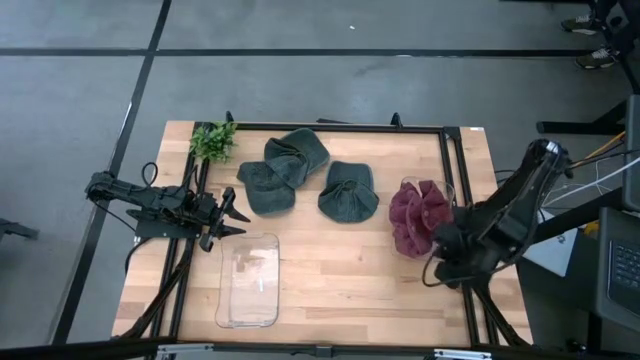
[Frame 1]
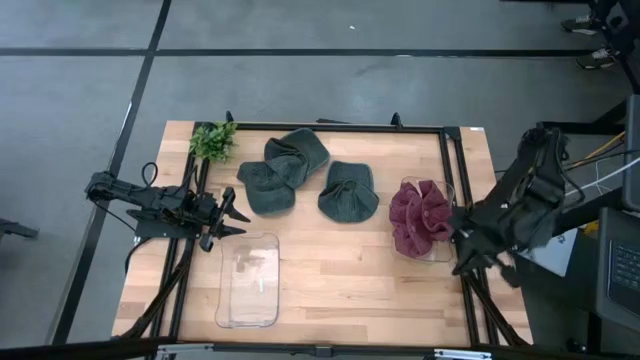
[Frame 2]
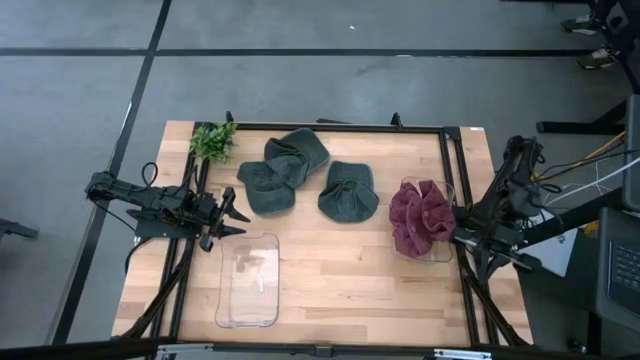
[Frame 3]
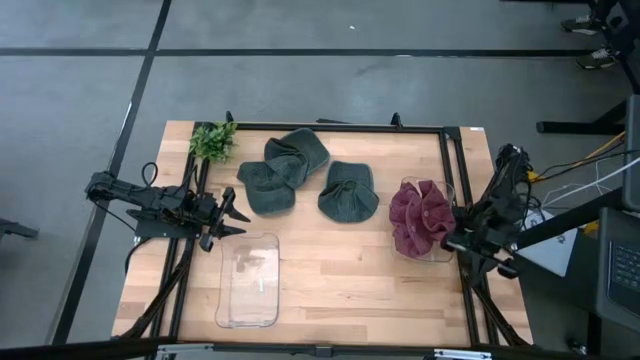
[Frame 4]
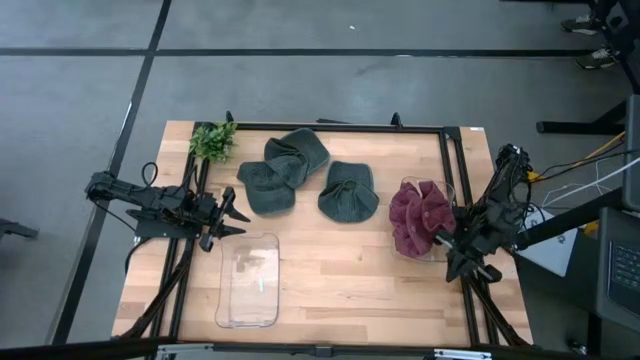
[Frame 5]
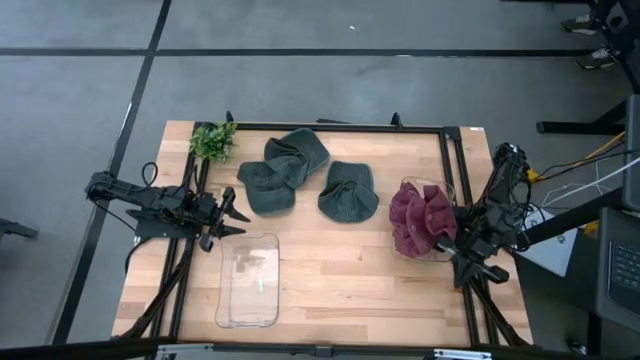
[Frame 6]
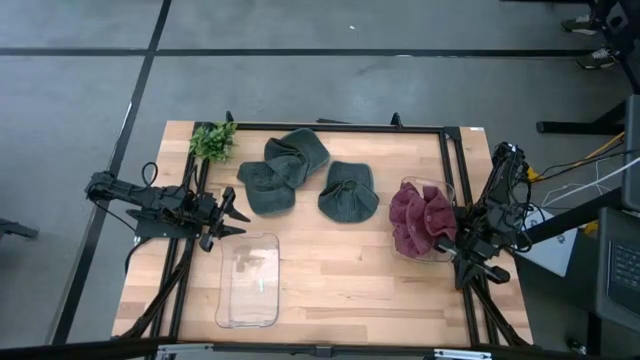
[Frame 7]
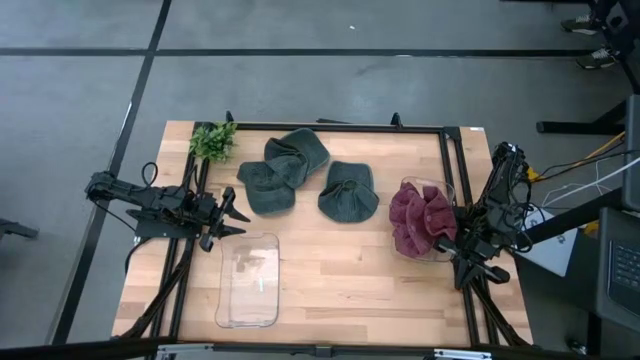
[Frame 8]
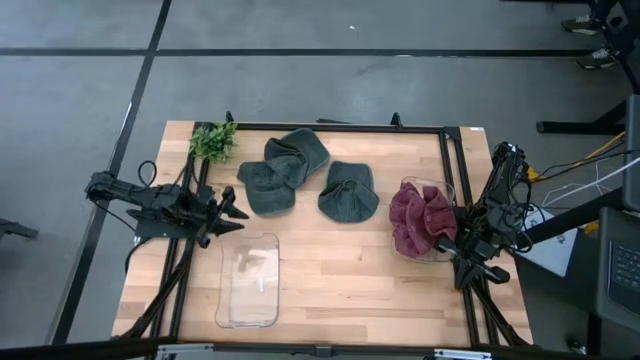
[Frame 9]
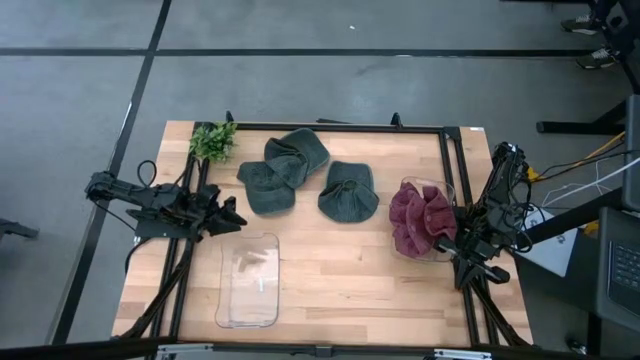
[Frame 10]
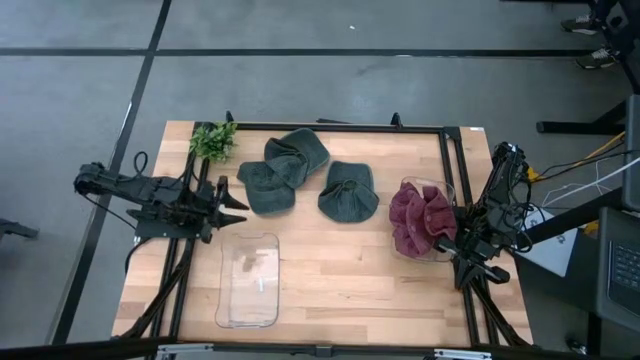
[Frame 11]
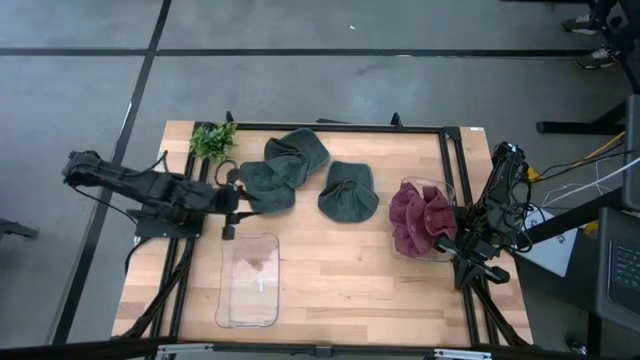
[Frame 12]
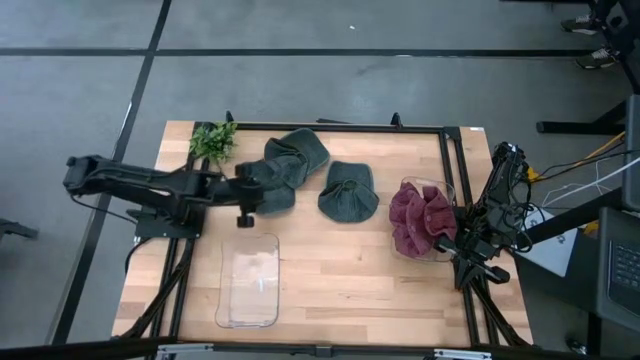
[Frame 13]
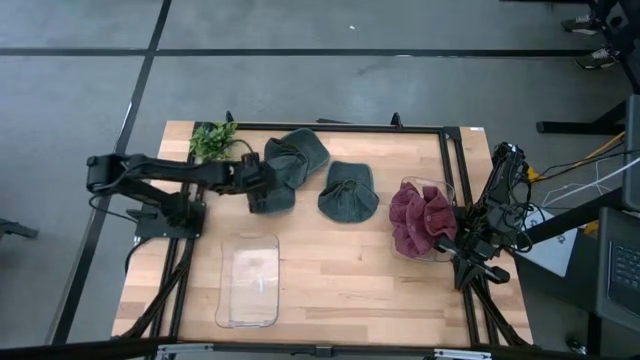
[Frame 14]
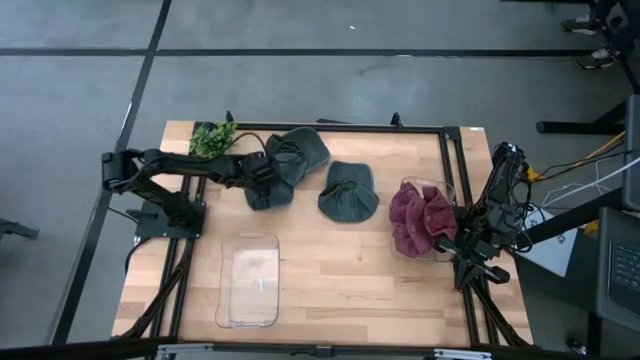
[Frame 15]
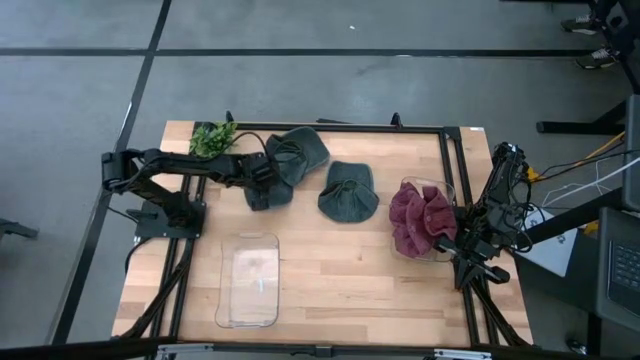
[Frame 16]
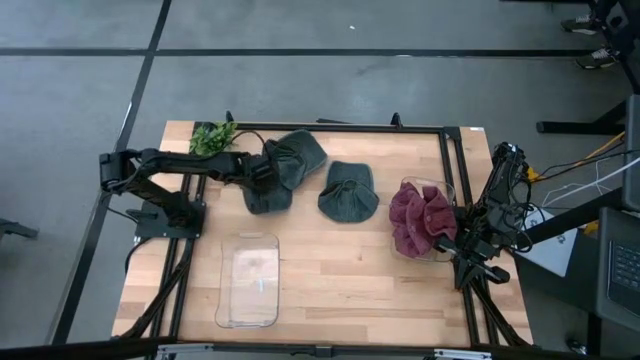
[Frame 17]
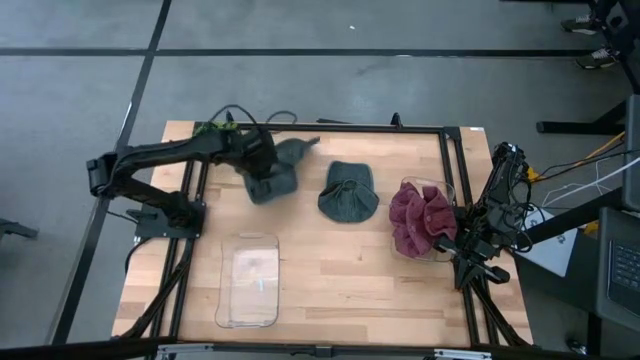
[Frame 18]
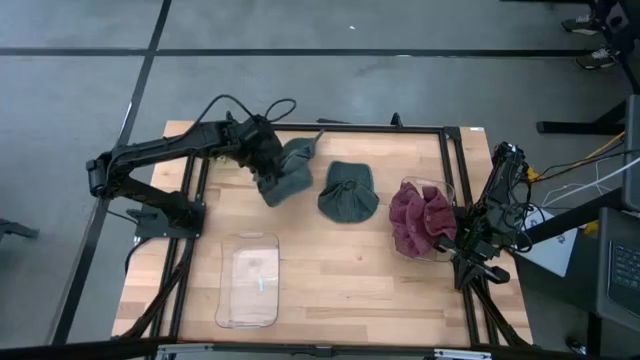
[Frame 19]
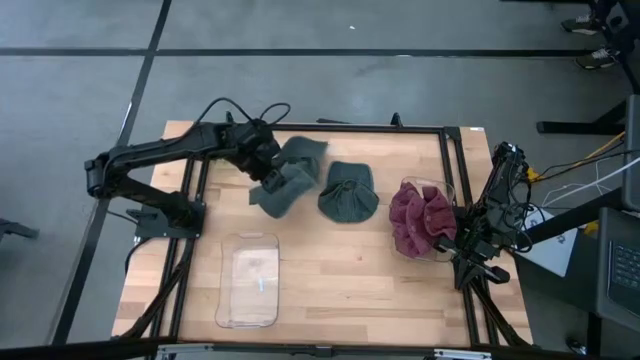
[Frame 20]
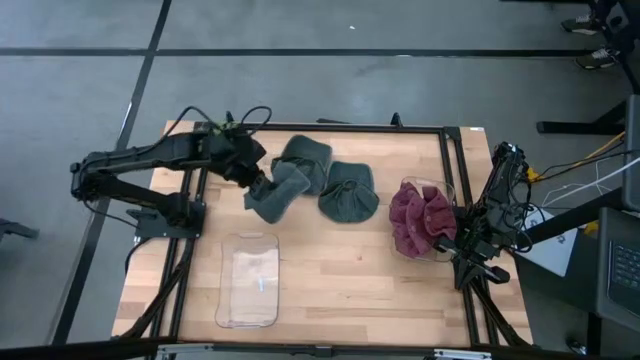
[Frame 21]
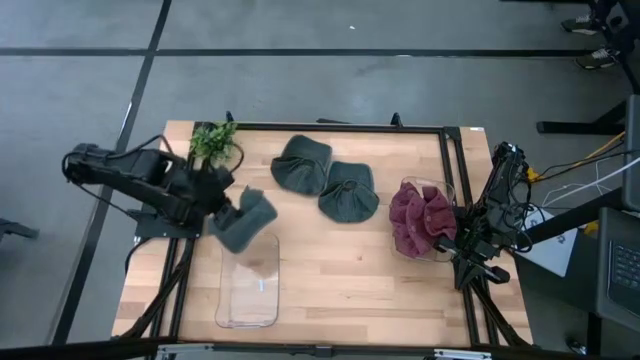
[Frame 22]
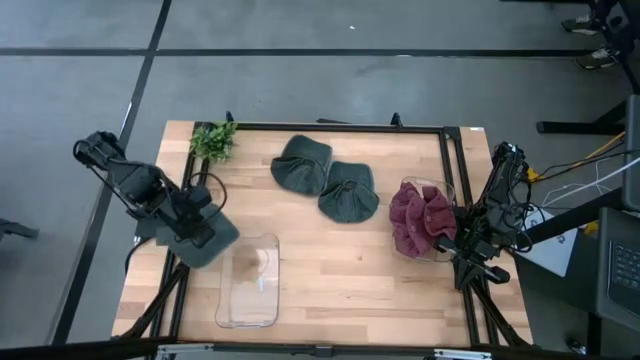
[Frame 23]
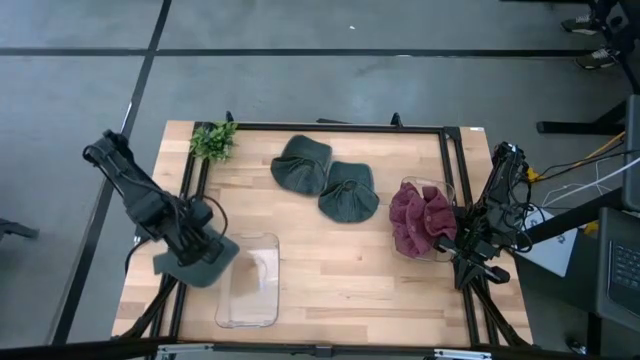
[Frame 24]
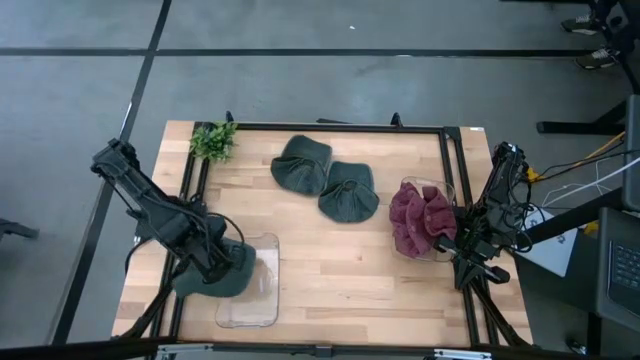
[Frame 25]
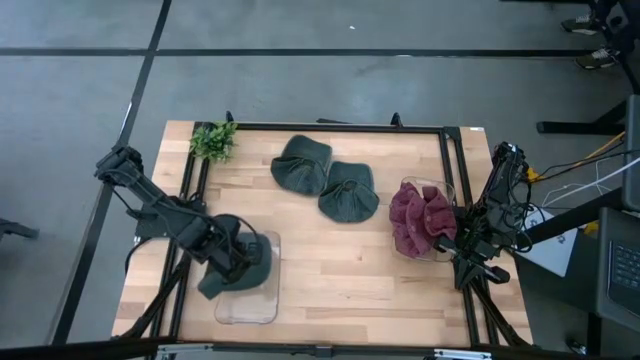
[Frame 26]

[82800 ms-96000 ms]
Task: Pick & Place hat
Put the left black cap into the left transparent bin

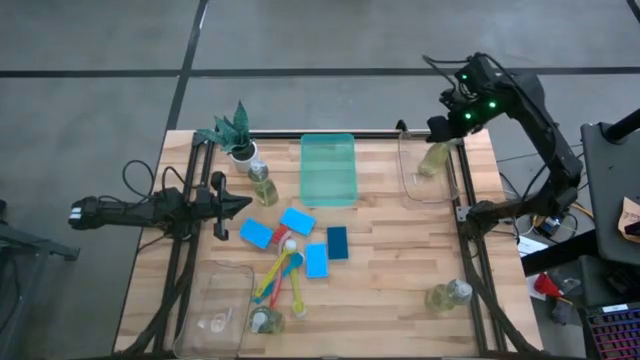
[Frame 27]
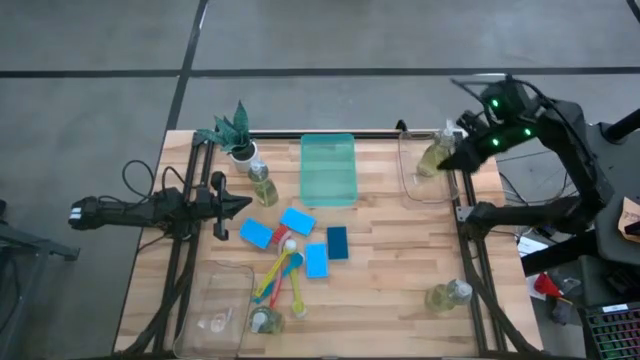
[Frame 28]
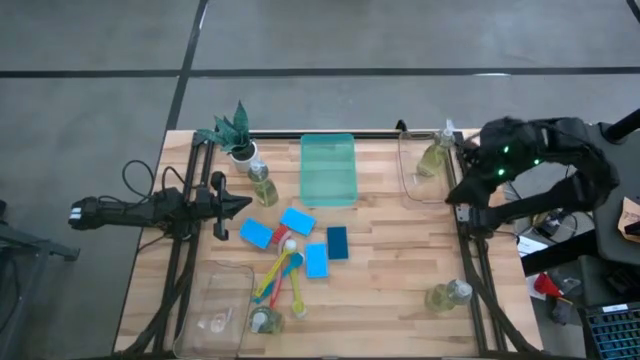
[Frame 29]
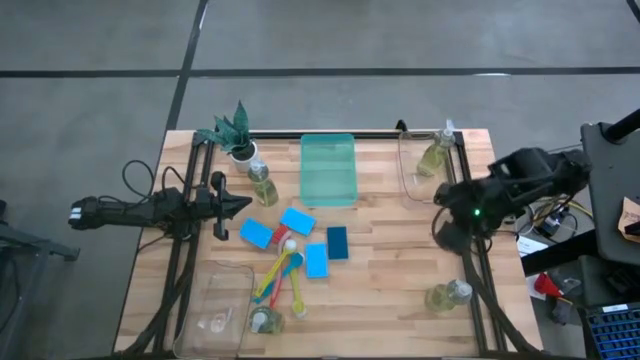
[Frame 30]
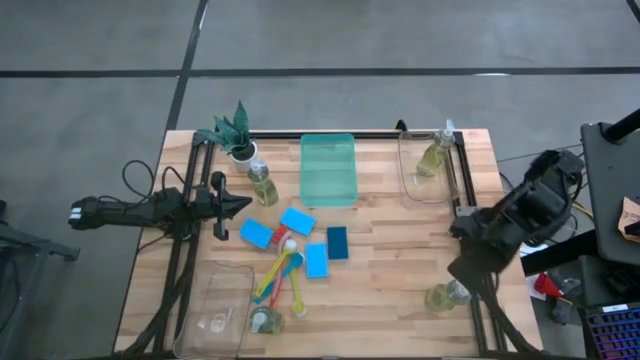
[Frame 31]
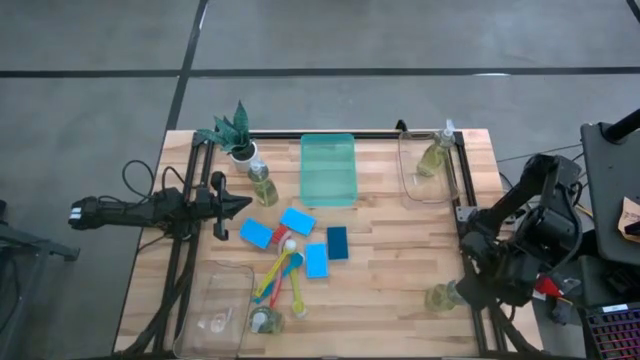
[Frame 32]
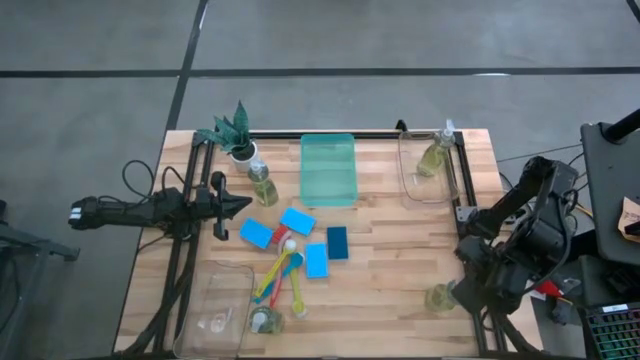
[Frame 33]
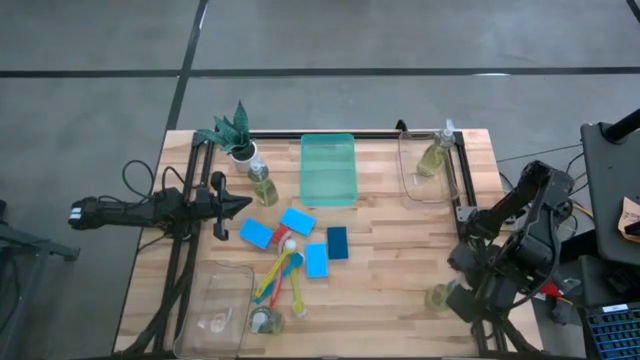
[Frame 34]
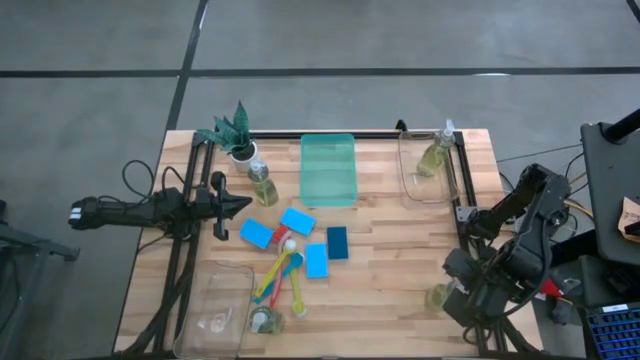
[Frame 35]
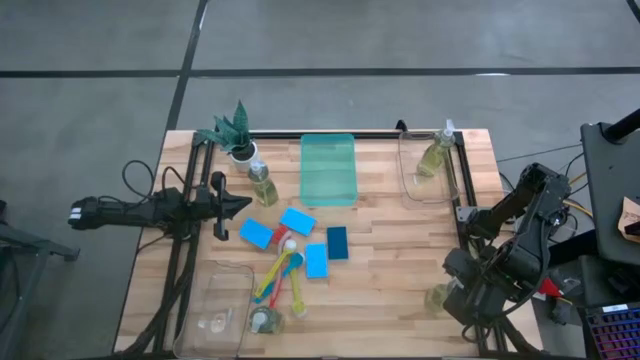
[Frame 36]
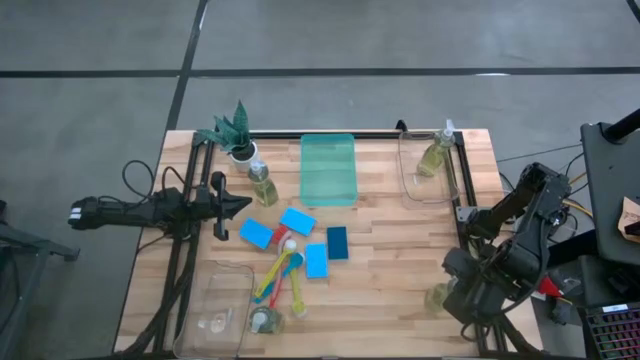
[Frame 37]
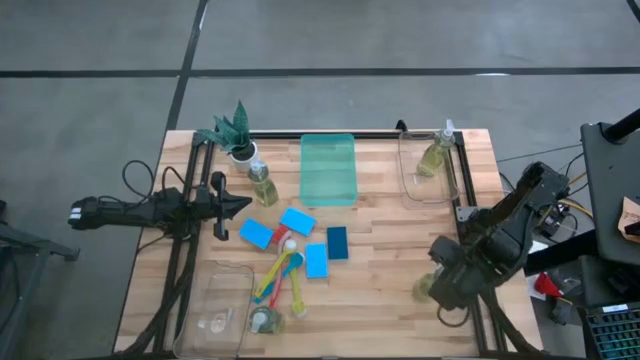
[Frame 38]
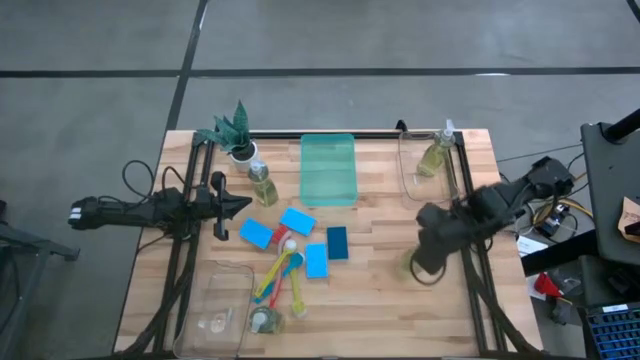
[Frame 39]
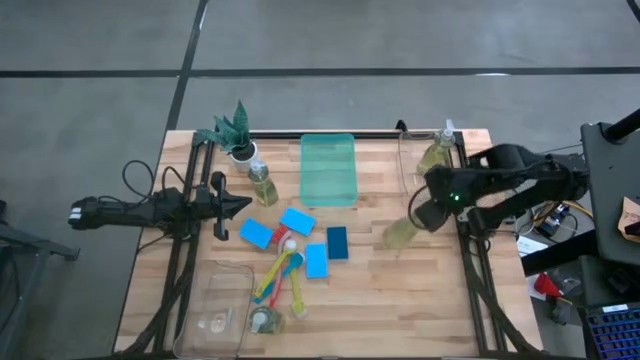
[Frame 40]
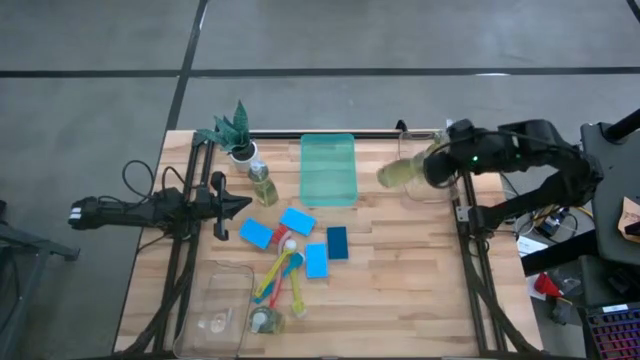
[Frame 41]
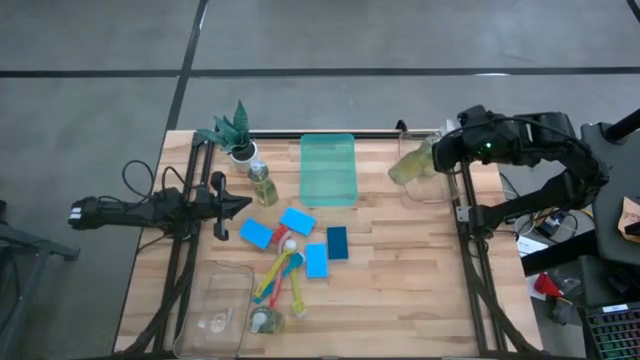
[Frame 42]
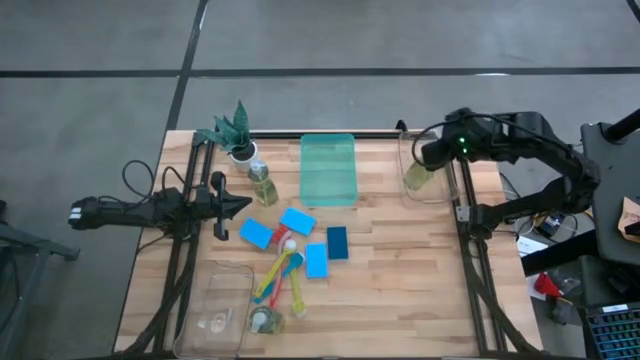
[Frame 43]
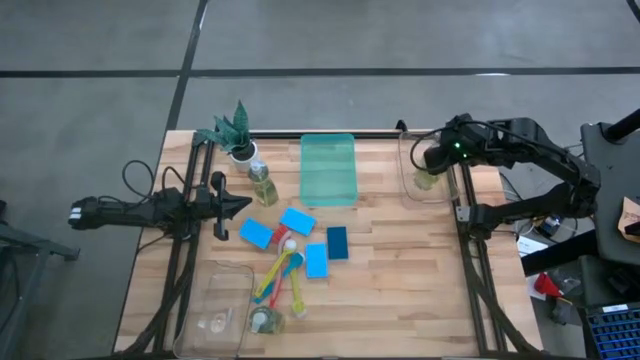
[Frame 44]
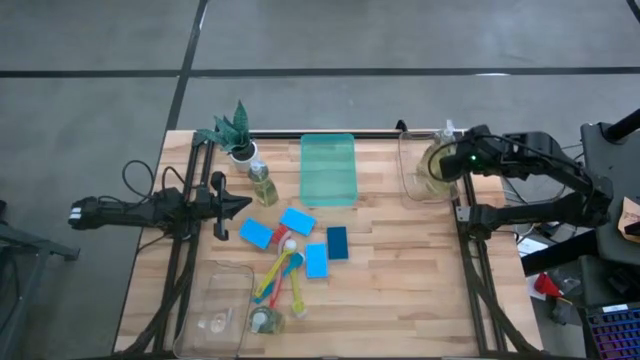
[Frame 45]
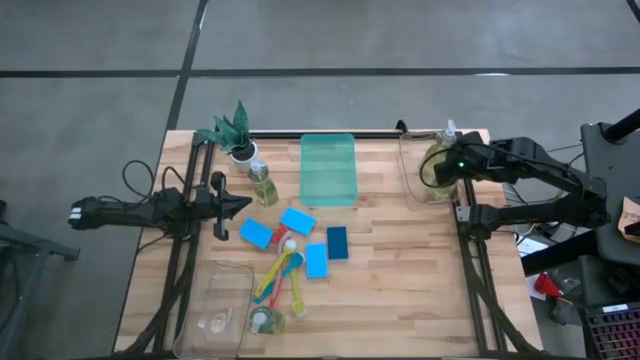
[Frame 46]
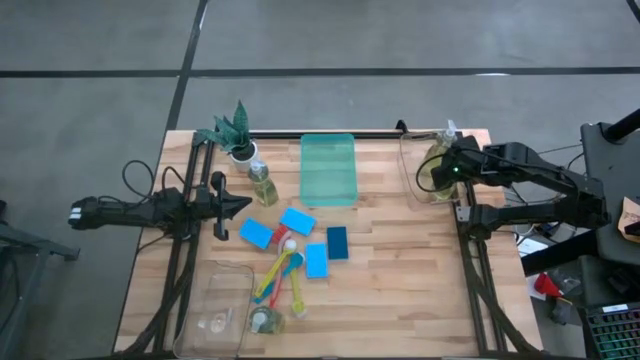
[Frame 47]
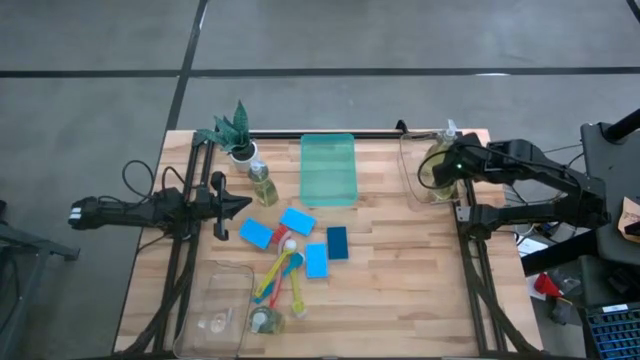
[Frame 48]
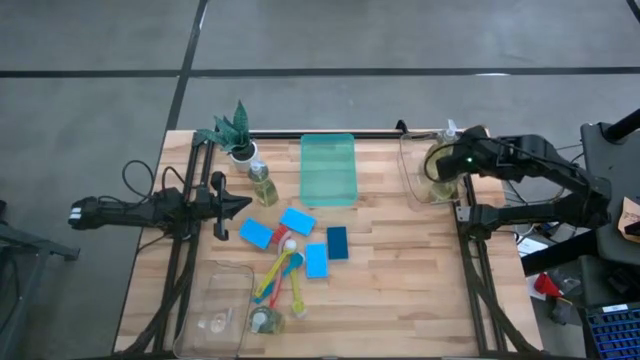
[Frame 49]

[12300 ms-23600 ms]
Task: Pick & Place Kitchen Sink Supplies
Put the yellow soap dispenser into the top transparent bin
